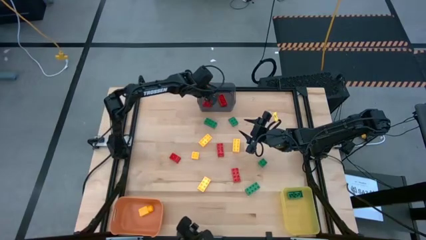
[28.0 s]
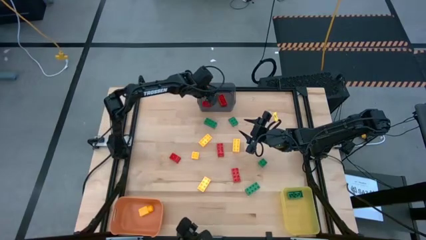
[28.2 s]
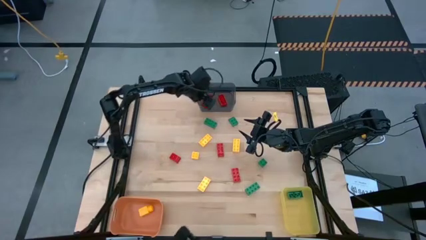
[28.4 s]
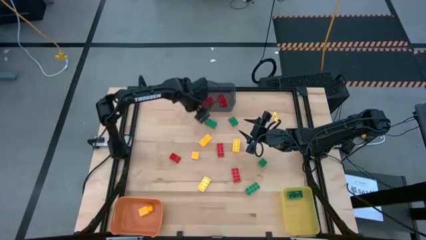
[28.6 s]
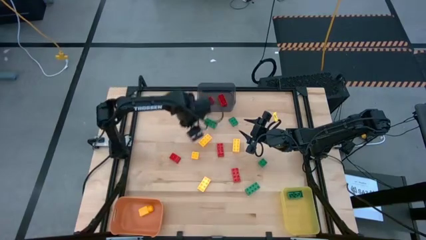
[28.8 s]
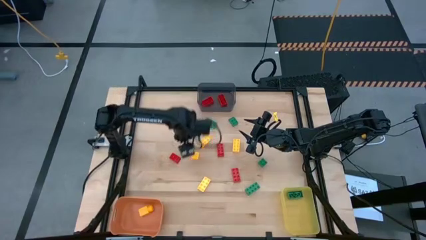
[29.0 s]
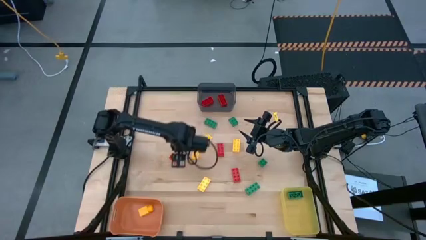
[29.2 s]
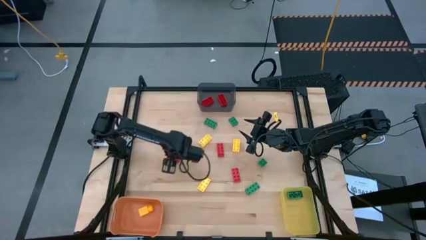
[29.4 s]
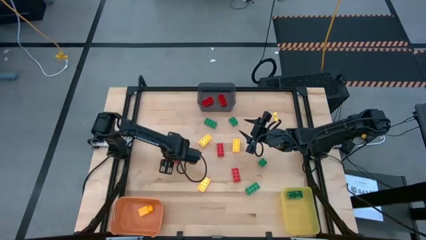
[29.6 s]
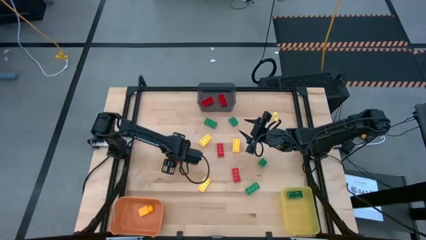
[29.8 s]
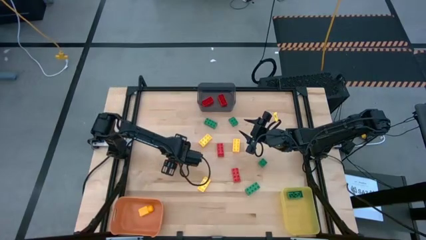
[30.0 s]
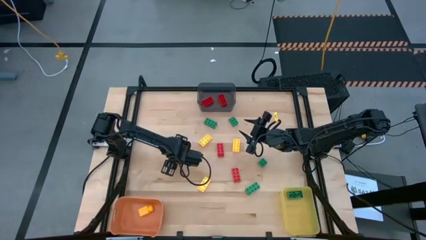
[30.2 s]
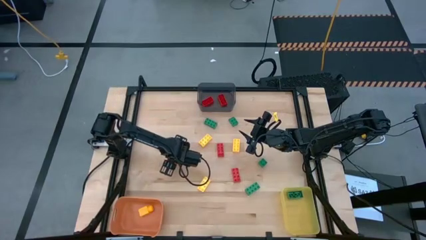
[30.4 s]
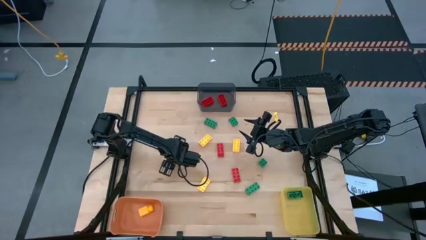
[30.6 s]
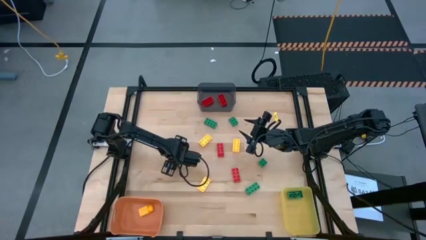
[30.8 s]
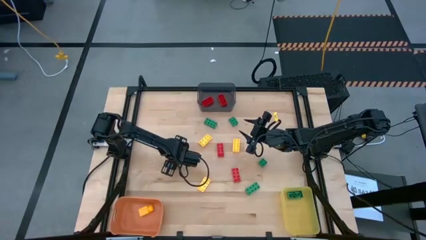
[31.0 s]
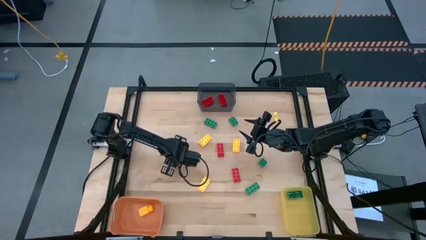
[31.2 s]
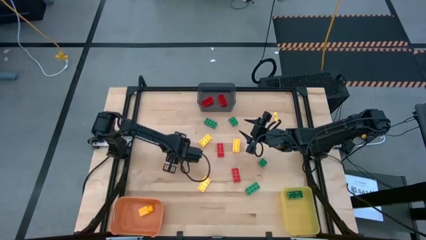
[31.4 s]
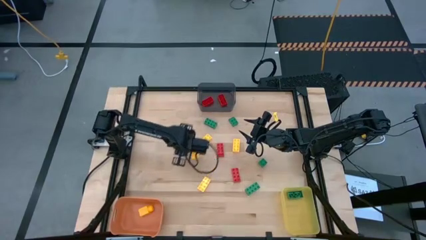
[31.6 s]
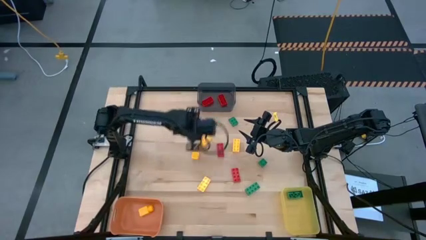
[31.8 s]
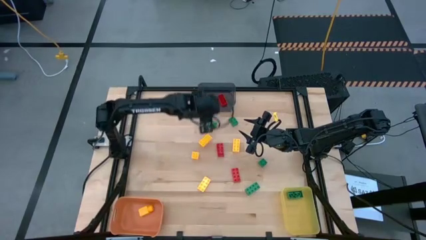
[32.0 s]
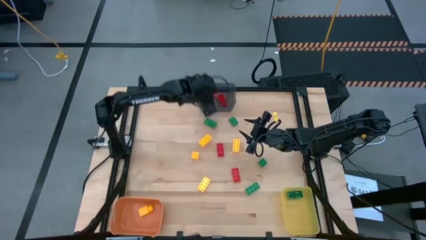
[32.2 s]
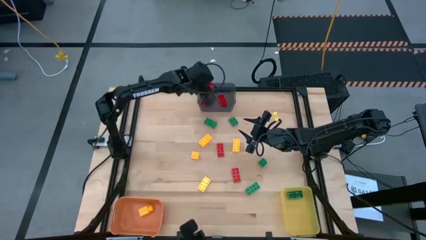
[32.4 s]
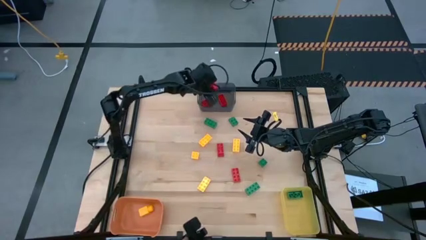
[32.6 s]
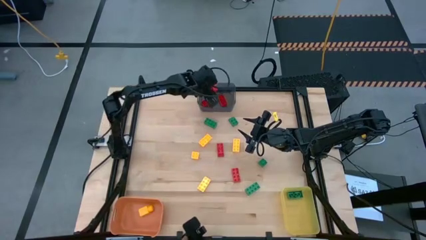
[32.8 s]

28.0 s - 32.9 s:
Task: Sort & place blocks by color
Put the red game piece into the black bin

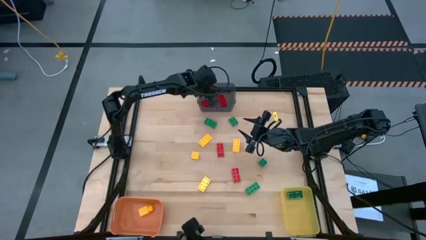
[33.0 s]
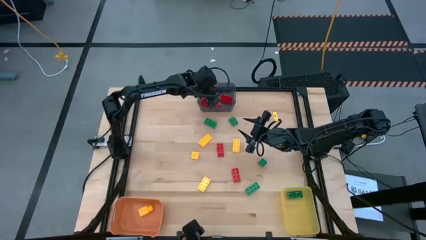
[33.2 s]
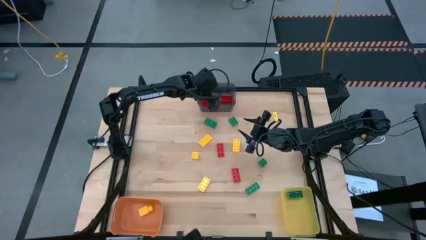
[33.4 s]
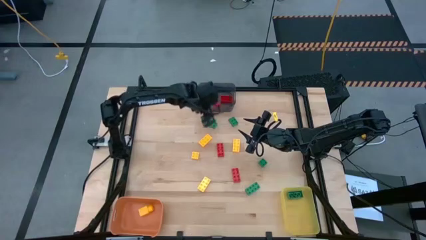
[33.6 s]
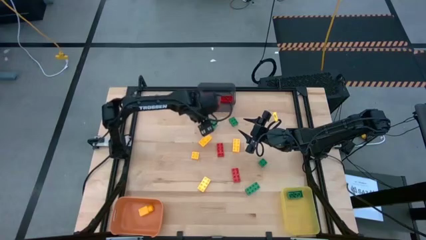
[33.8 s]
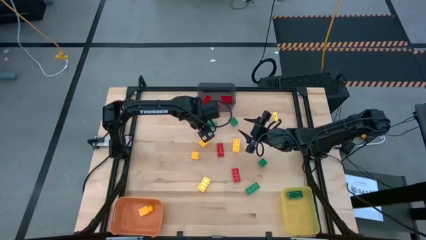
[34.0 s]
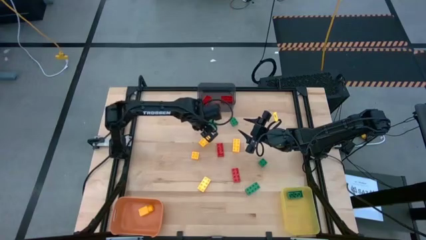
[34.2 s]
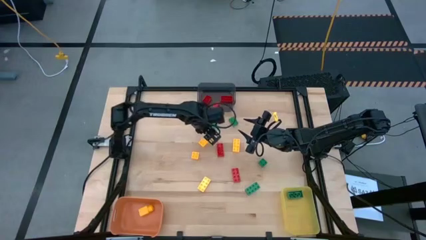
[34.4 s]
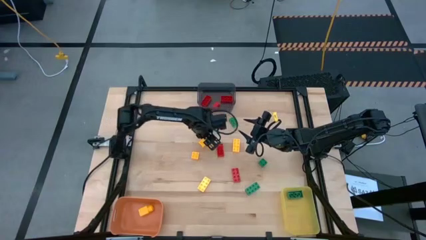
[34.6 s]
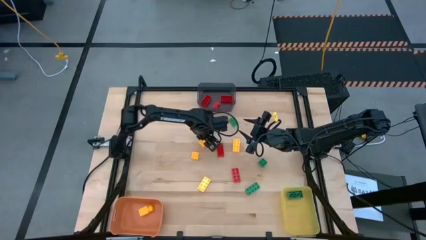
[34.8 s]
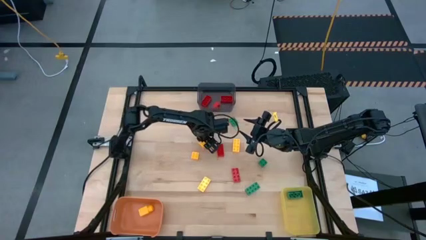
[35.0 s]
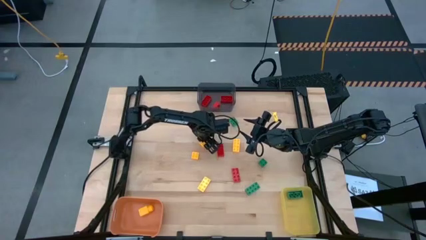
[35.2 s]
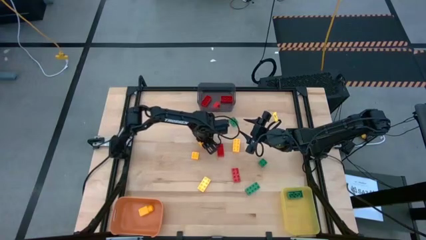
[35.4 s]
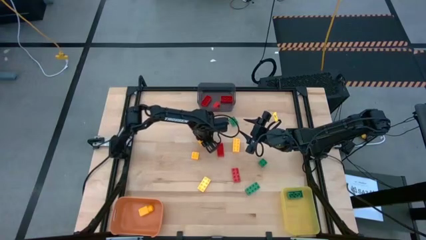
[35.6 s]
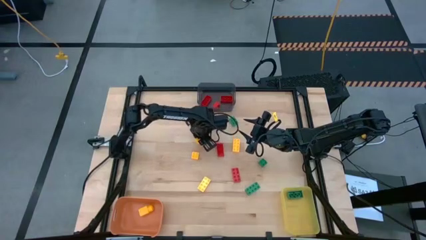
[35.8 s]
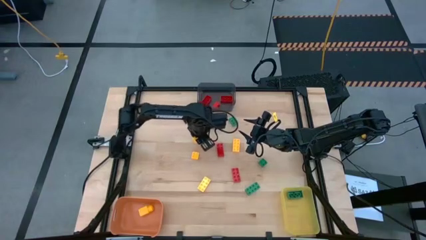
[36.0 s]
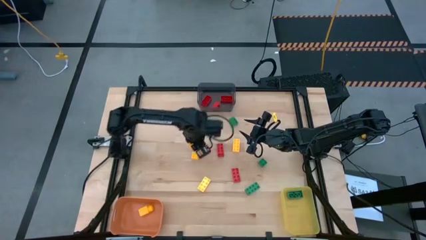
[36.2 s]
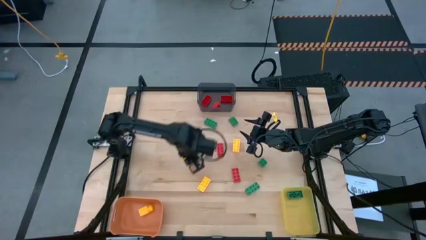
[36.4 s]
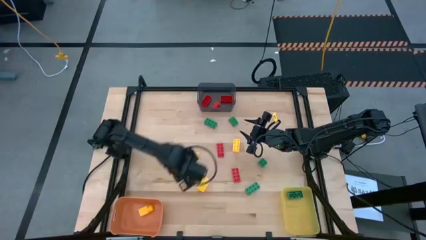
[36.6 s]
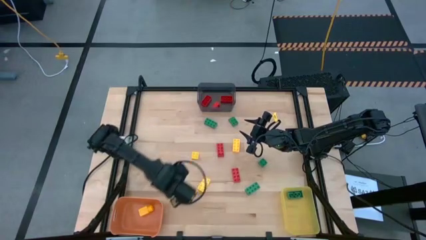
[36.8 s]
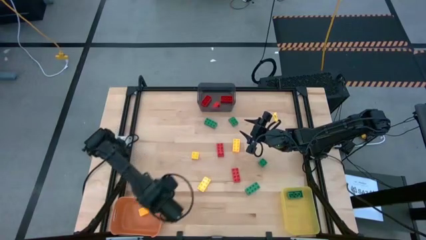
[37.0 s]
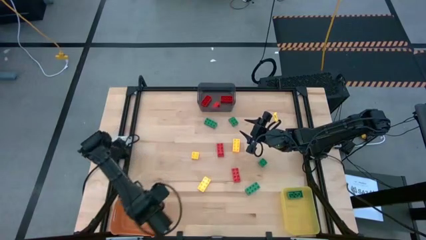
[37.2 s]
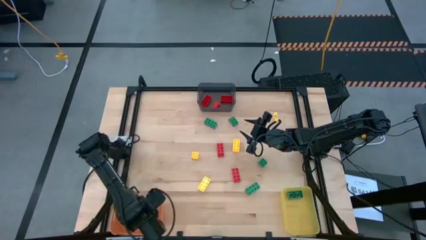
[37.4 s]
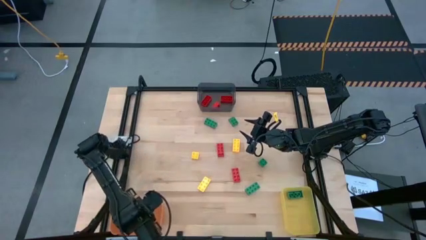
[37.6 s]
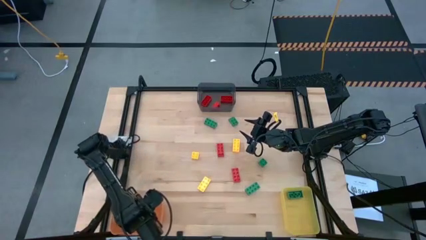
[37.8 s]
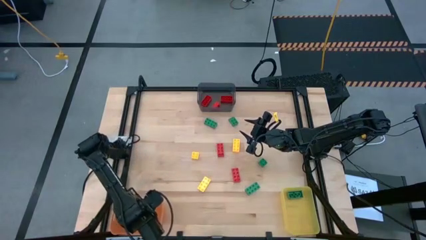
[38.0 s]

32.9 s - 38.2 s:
Put the yellow game piece into the orange bin

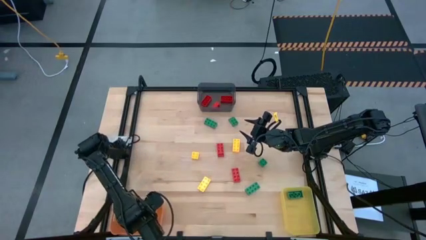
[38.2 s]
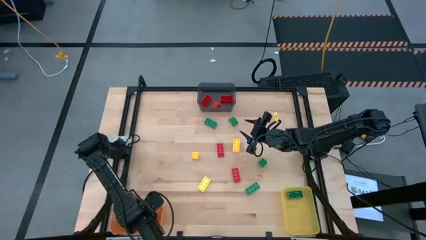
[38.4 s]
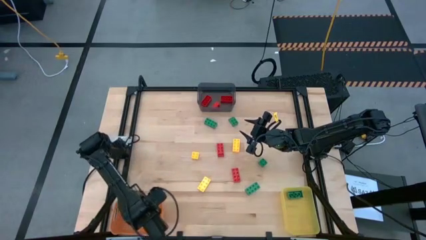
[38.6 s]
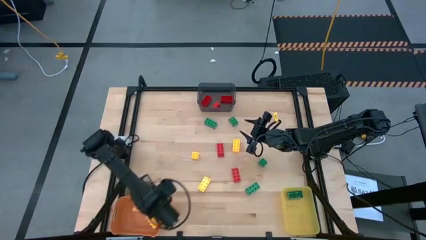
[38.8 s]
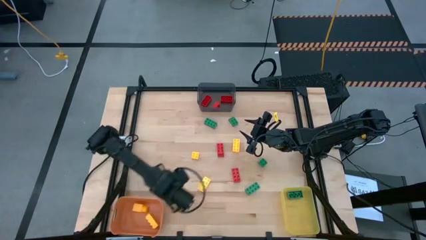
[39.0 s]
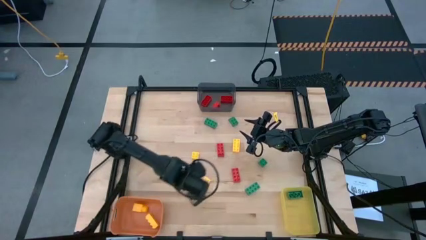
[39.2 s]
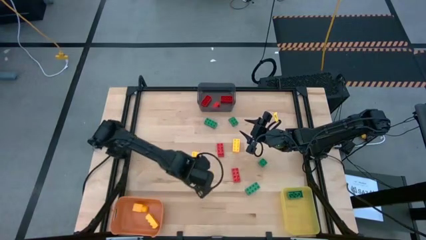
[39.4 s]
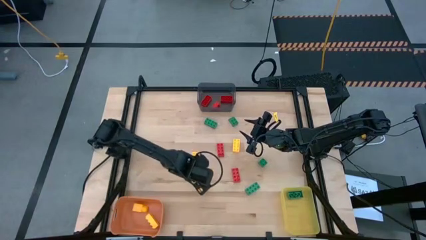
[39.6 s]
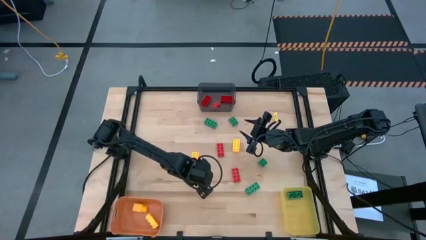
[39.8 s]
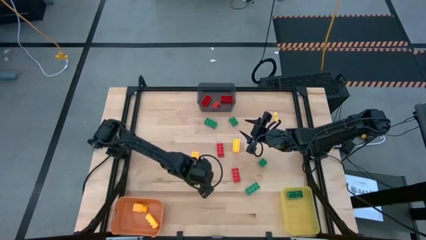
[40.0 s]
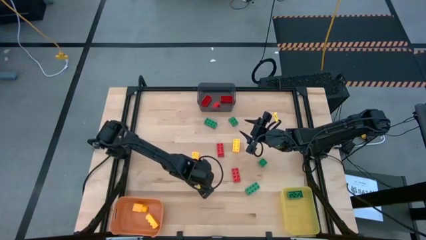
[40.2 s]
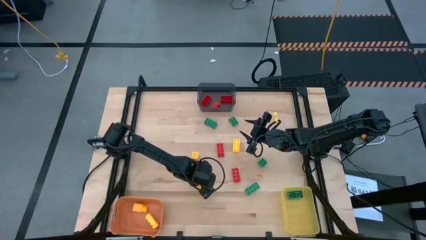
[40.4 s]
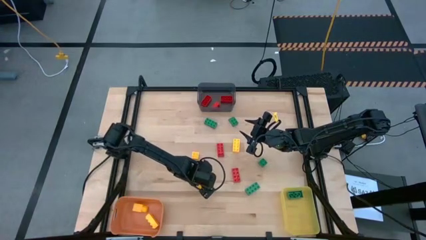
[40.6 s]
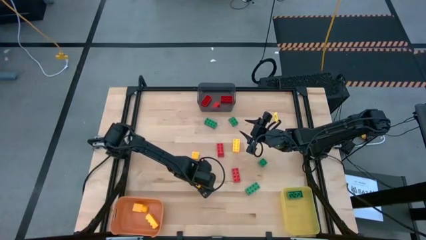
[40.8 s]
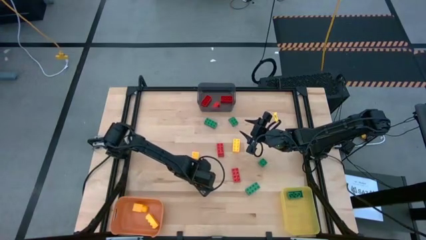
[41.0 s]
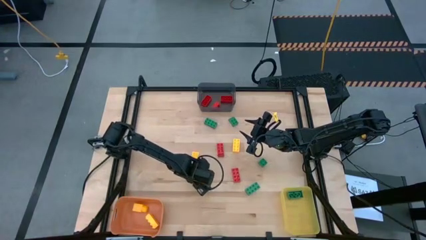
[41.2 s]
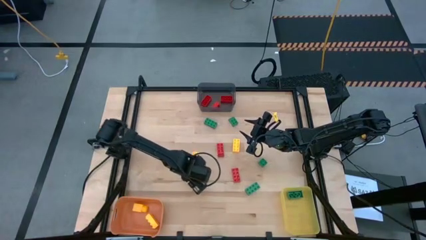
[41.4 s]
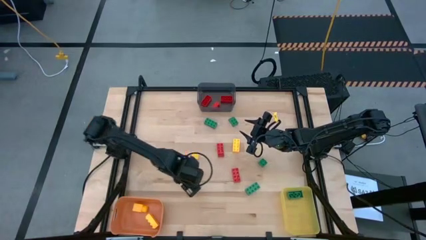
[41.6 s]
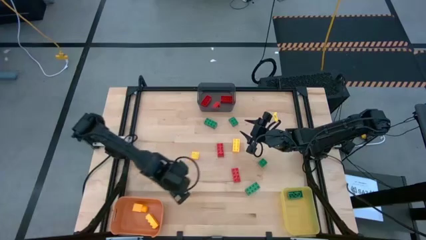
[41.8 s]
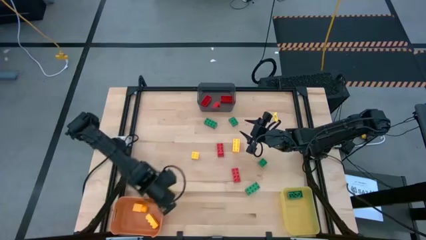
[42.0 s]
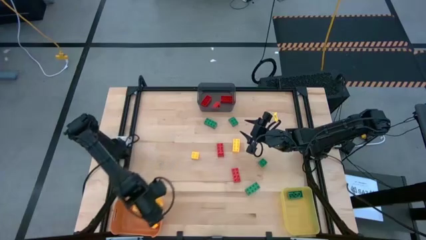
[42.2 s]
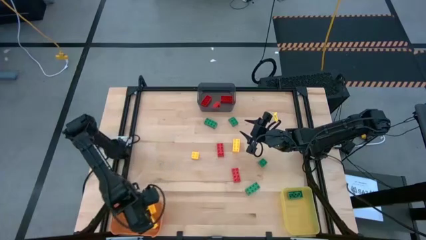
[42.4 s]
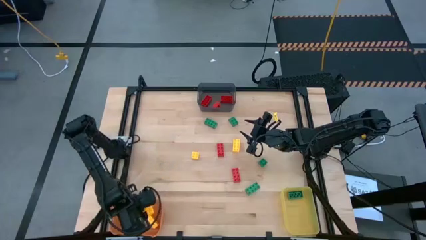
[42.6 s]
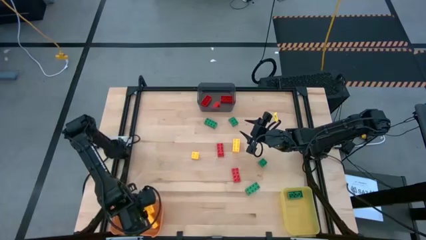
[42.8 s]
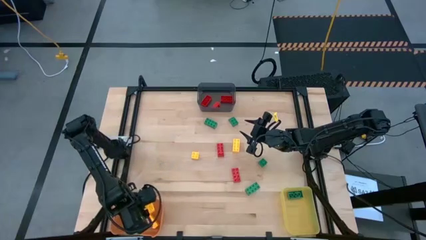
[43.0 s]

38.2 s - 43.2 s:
Put the yellow game piece into the orange bin

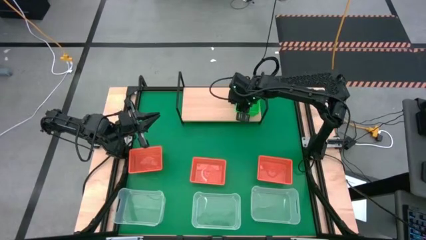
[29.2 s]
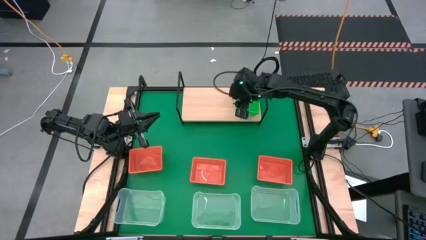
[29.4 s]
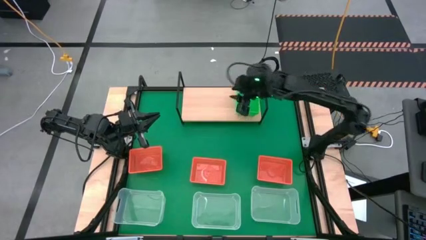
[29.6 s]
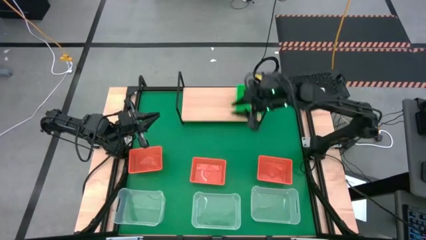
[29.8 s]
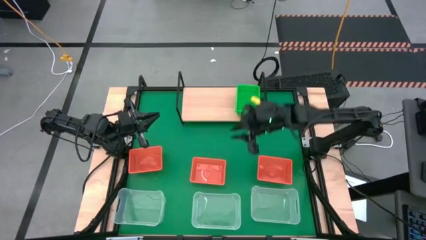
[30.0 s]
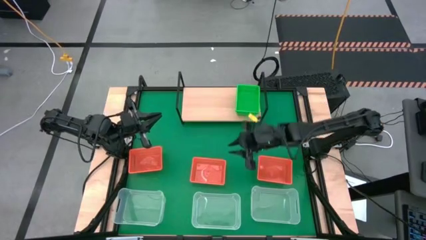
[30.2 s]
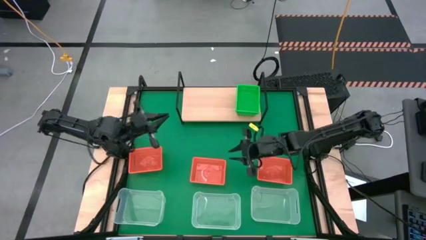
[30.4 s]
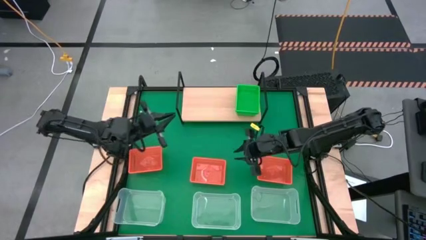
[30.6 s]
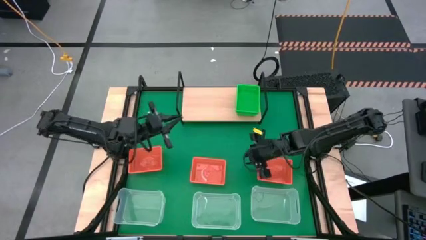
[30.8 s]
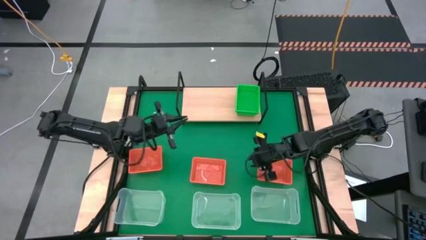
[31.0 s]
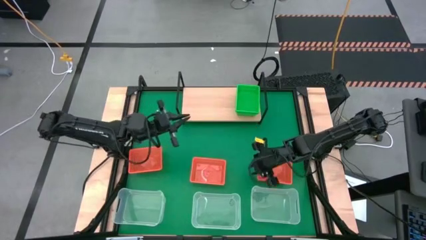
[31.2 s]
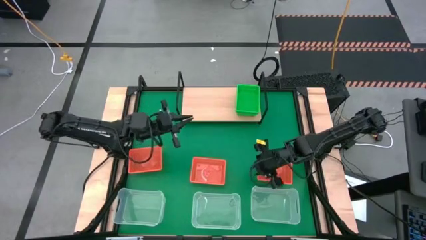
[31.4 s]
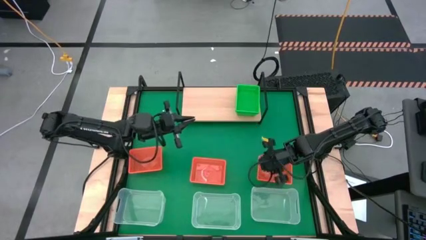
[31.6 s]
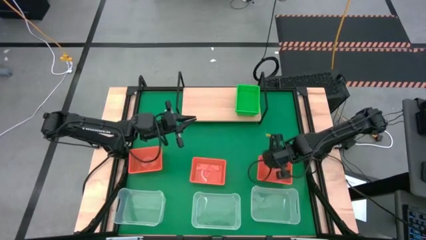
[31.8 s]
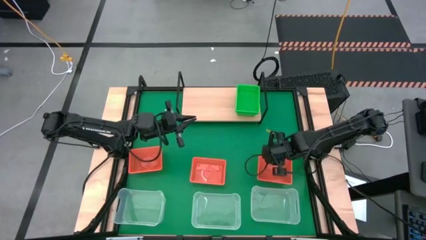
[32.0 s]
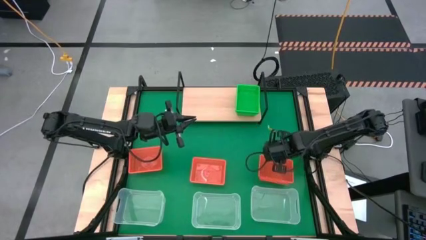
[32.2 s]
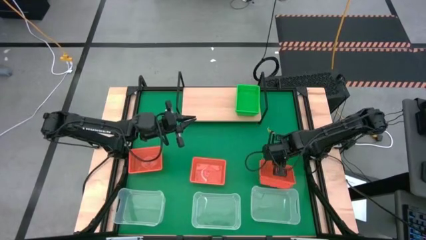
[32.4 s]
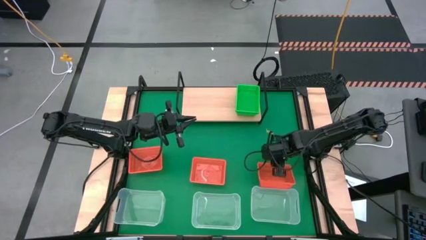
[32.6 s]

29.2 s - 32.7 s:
Task: Stack baskets on shelf by color
Put the right orange bin on the shelf
